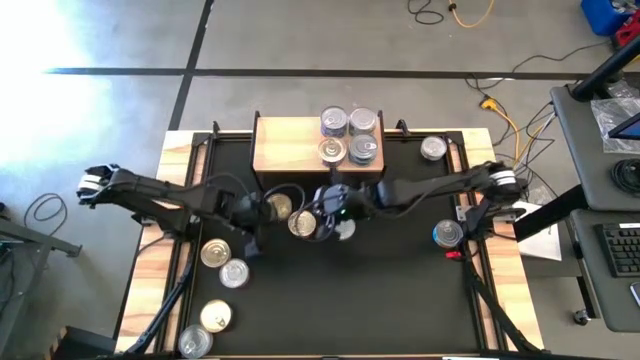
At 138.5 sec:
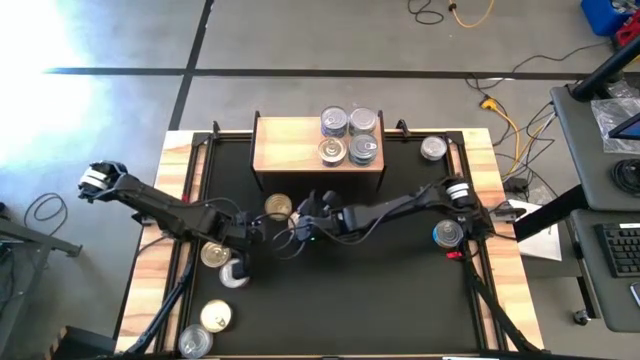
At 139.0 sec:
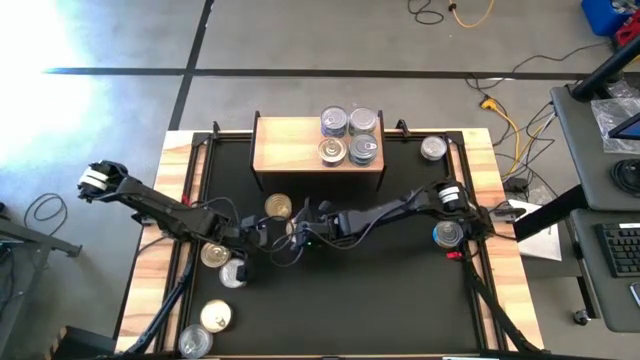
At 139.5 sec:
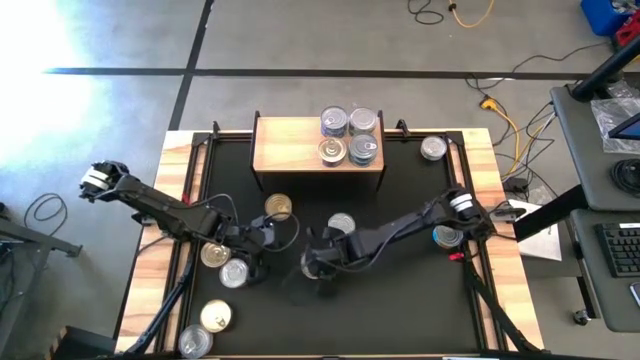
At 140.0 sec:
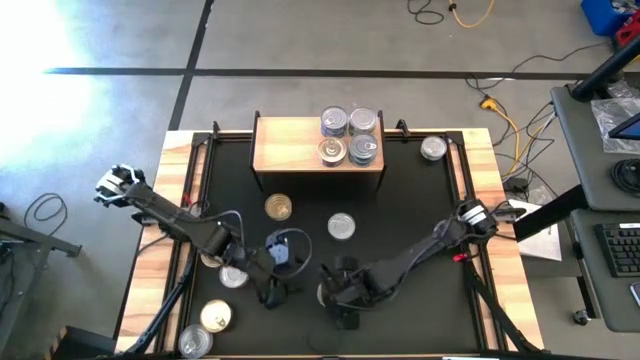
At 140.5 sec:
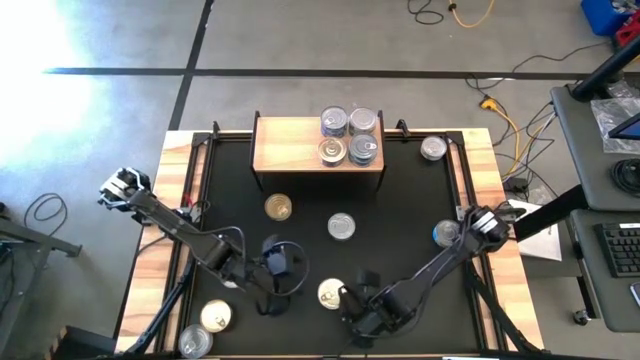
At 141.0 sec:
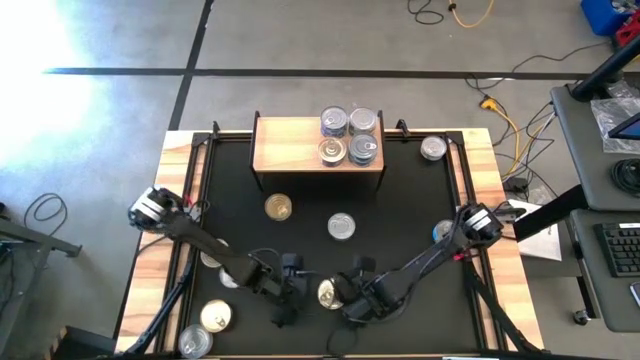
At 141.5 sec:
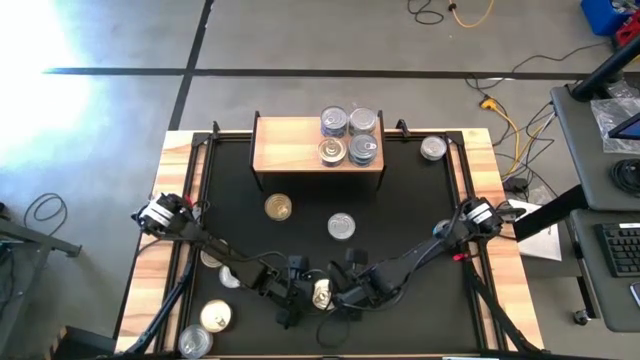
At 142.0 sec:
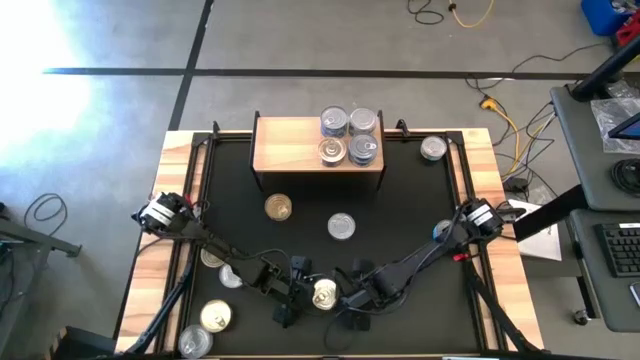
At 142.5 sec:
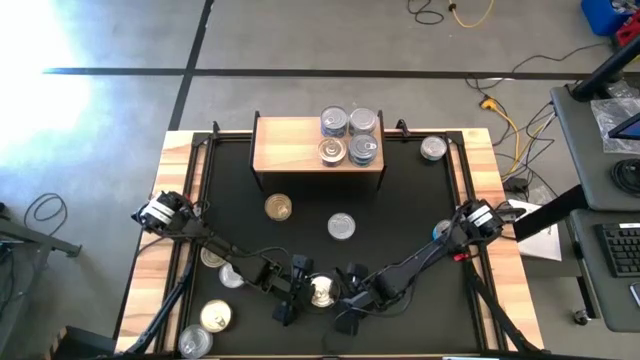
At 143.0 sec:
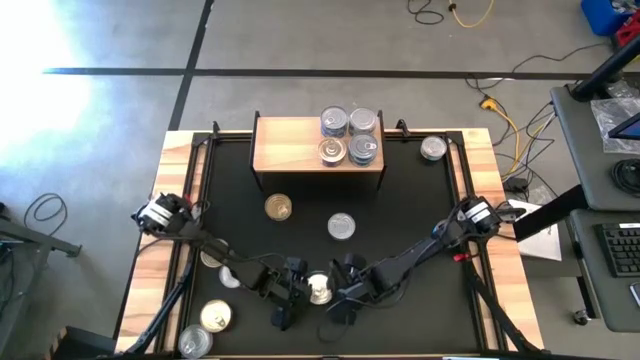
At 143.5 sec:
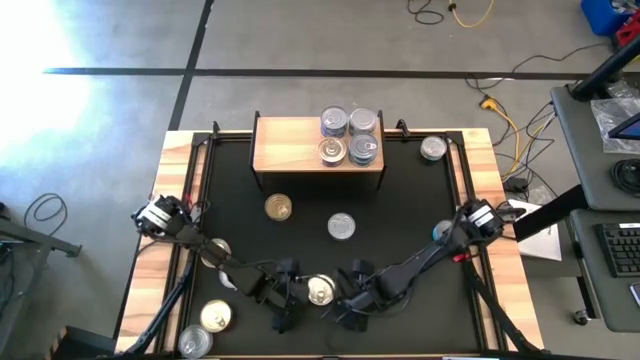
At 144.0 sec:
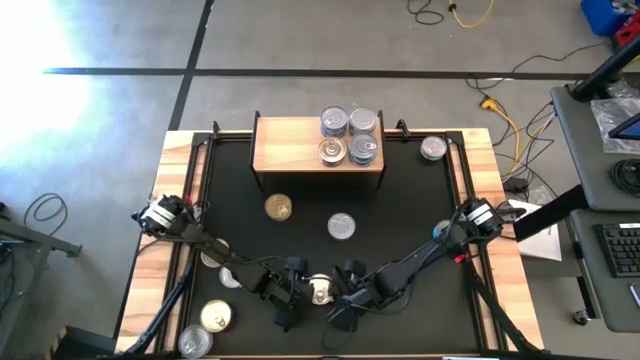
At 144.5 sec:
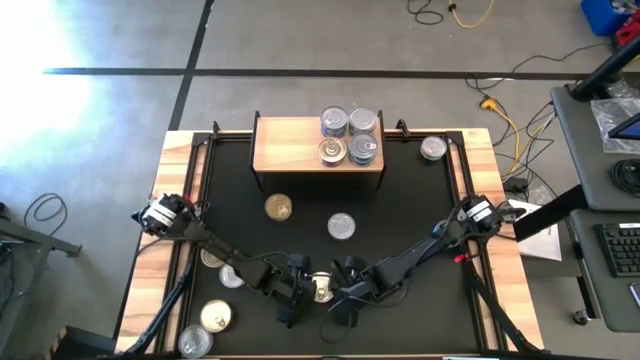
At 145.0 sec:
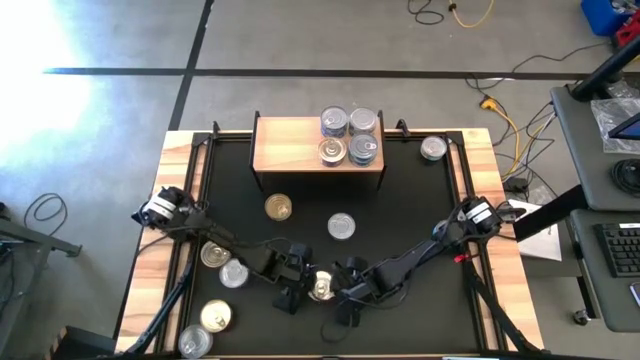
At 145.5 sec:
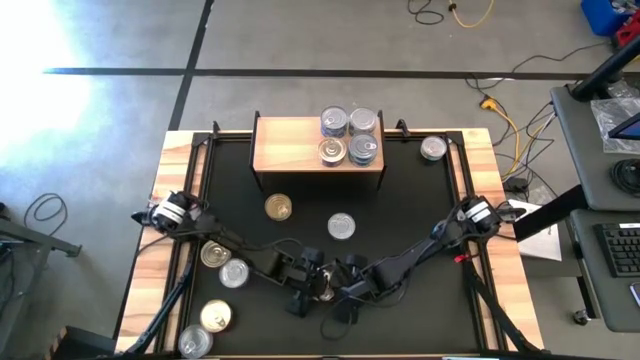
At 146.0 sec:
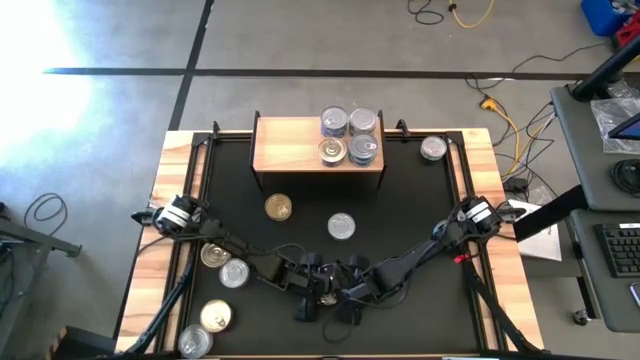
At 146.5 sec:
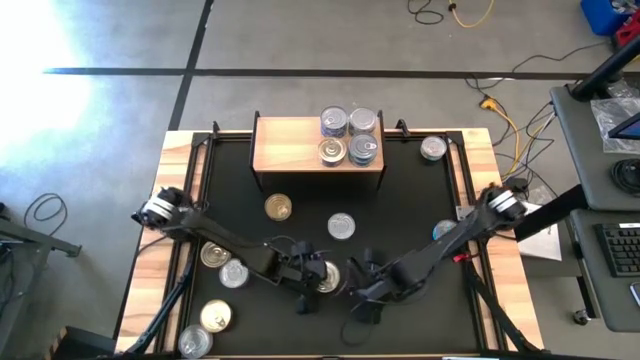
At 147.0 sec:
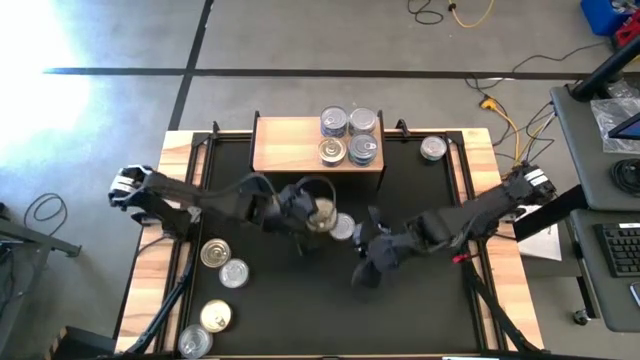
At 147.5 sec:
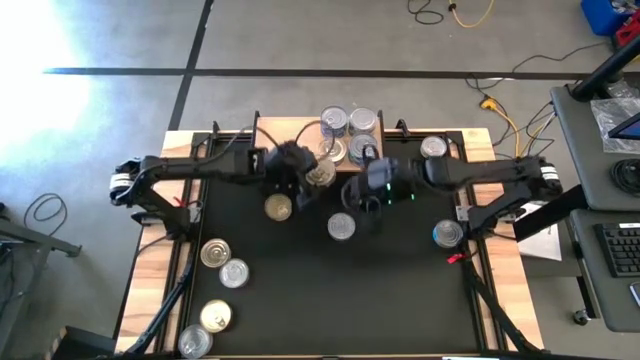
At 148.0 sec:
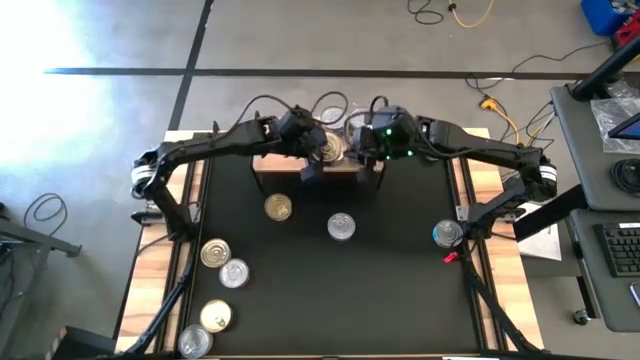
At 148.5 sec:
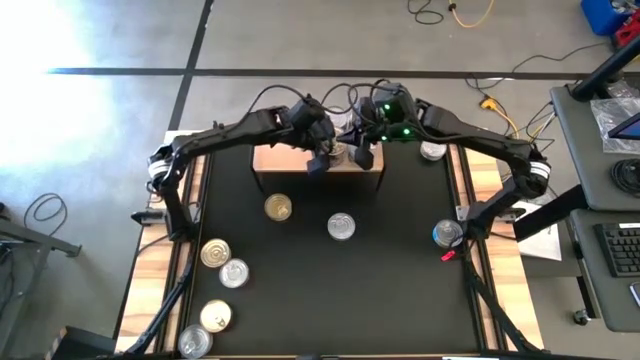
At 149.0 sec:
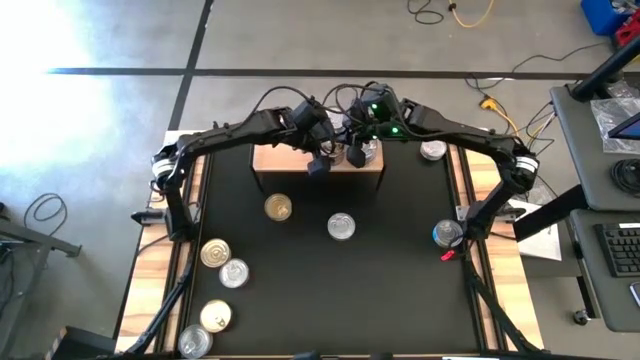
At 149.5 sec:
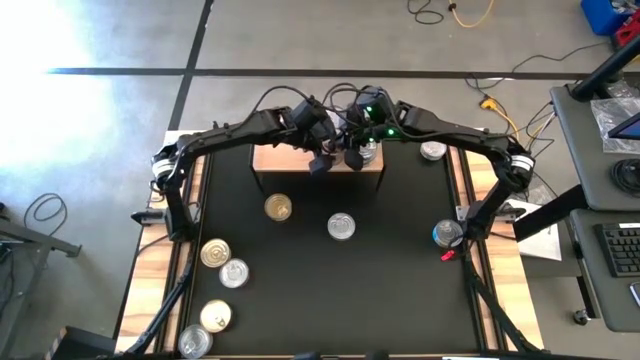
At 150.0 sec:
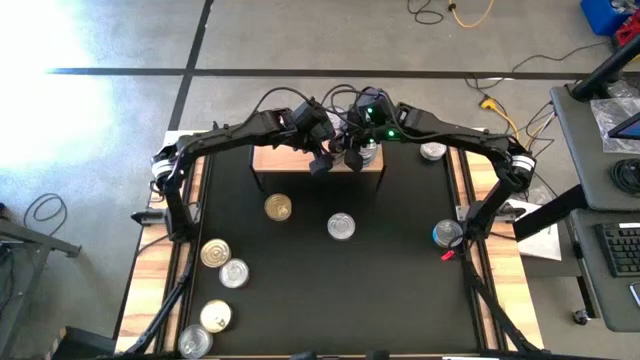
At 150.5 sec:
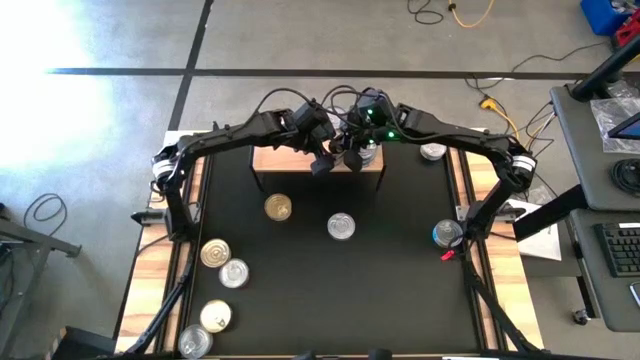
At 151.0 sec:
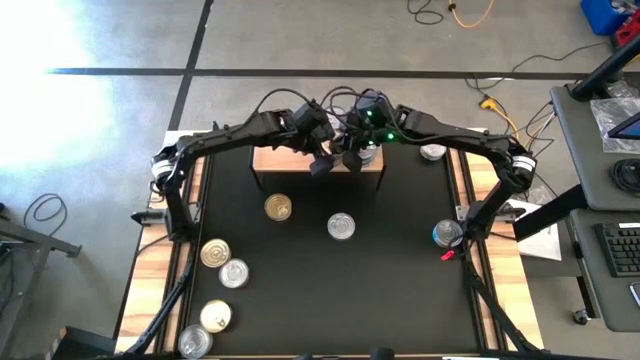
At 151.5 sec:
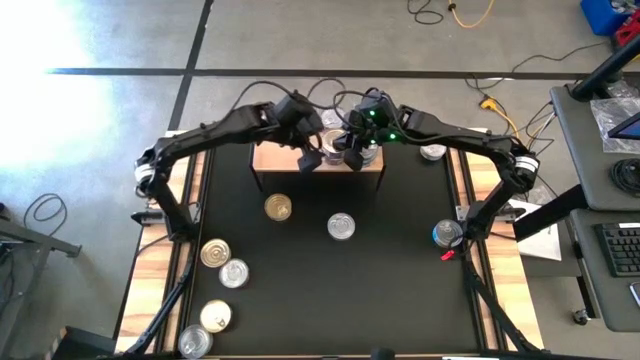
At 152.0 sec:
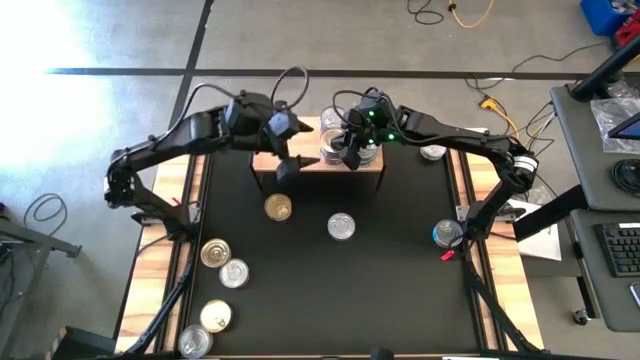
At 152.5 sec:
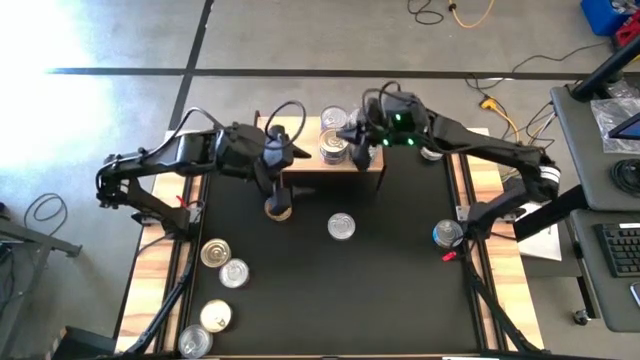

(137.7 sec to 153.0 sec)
Task: Stack canned seafood by type on shelf
Stack the top pink center tuna can on top of the pink tuna can on the shelf

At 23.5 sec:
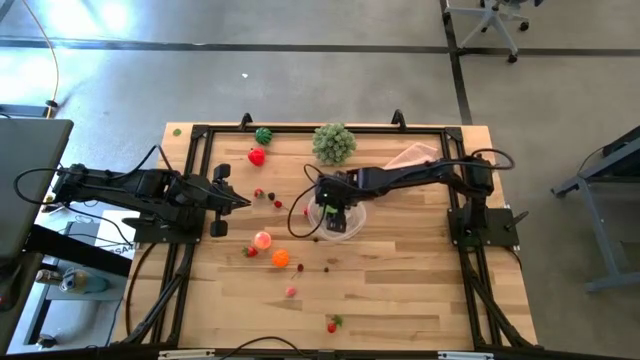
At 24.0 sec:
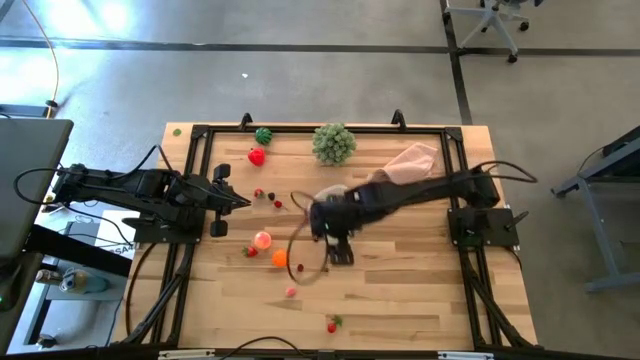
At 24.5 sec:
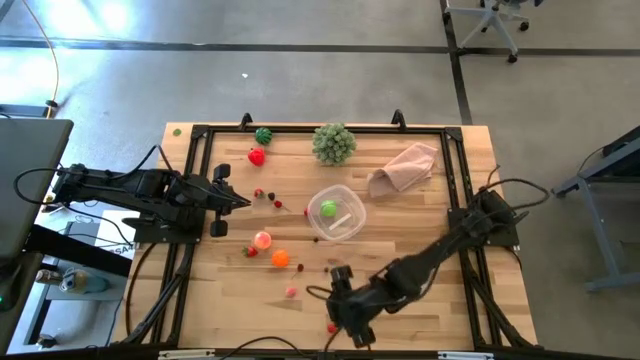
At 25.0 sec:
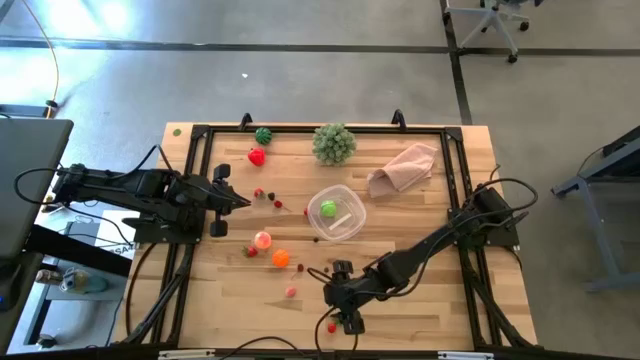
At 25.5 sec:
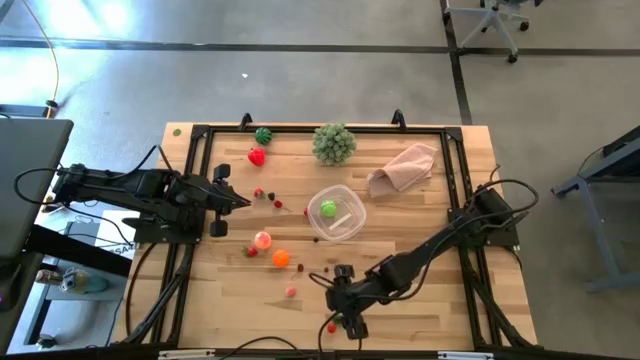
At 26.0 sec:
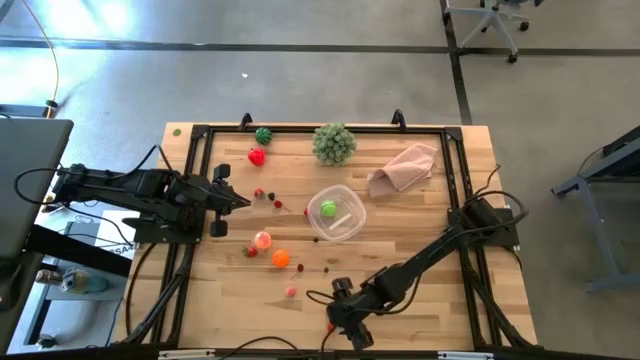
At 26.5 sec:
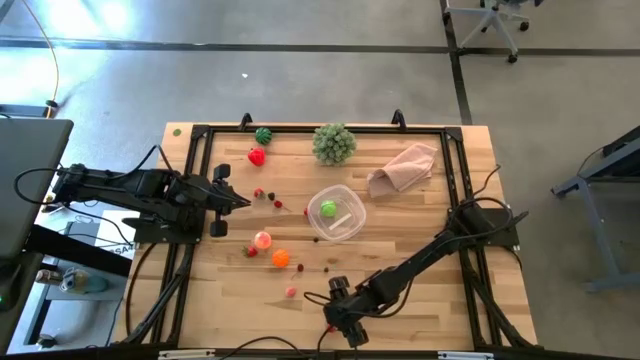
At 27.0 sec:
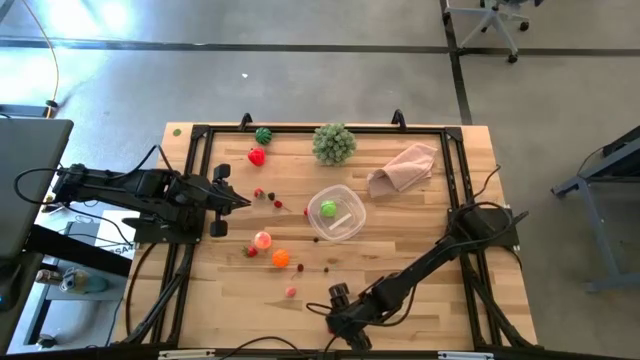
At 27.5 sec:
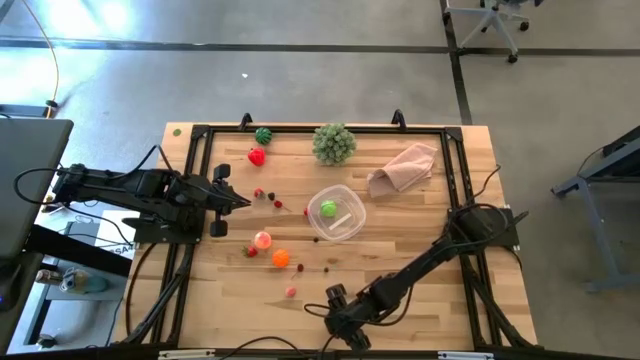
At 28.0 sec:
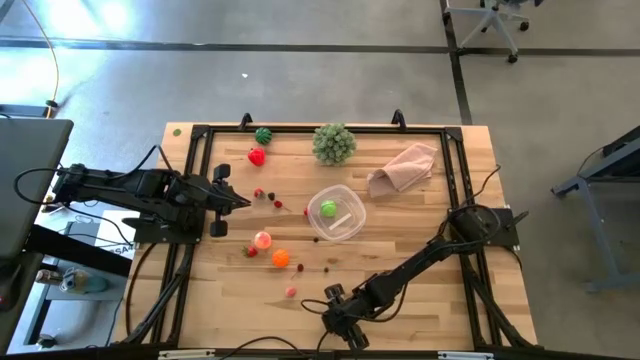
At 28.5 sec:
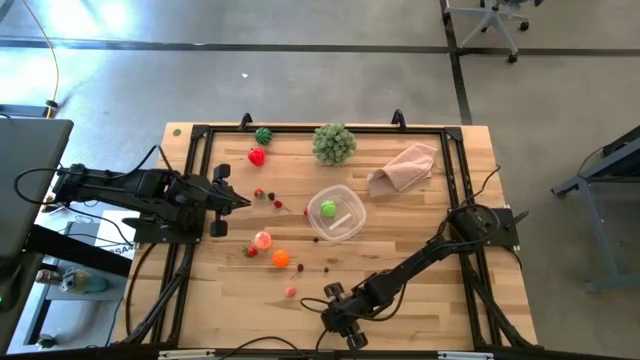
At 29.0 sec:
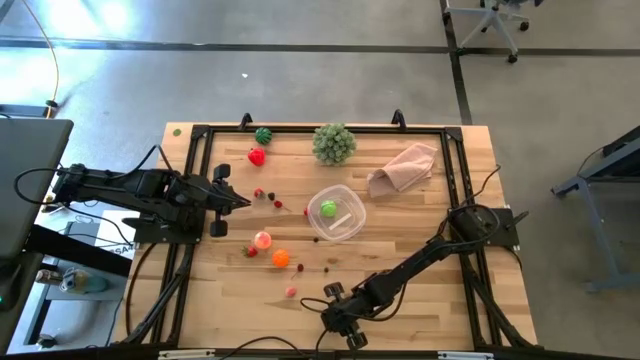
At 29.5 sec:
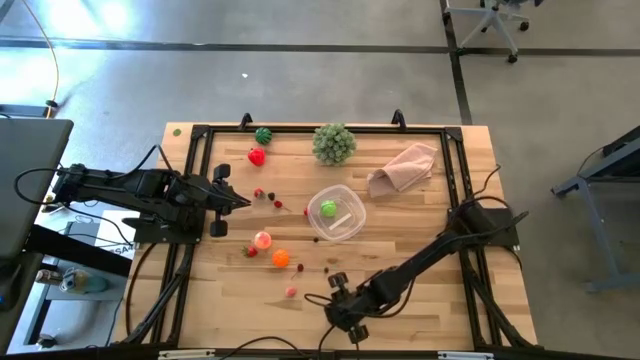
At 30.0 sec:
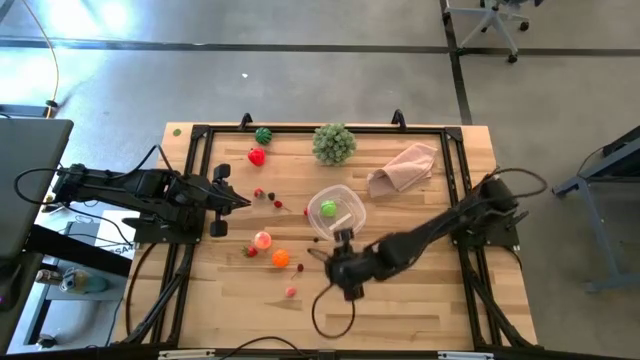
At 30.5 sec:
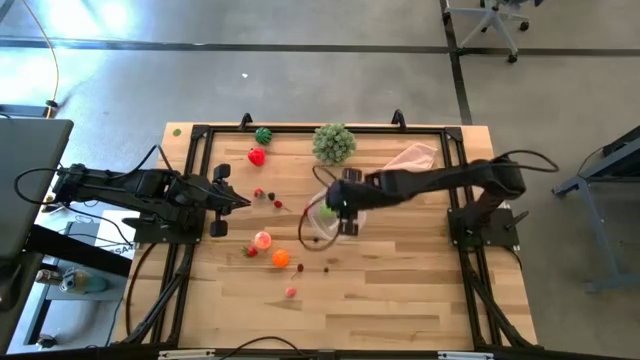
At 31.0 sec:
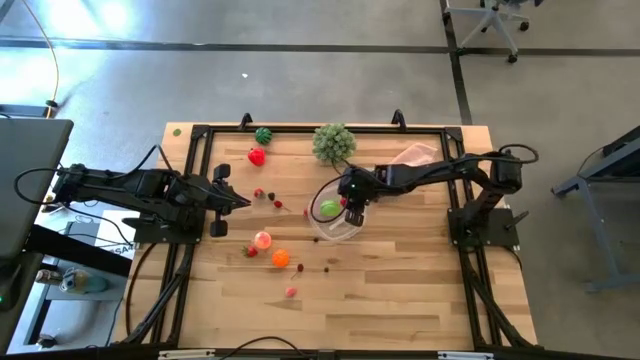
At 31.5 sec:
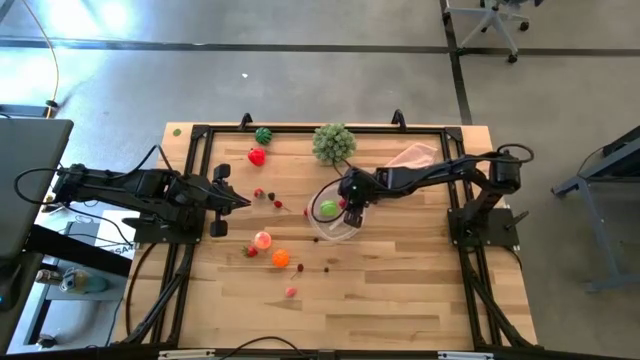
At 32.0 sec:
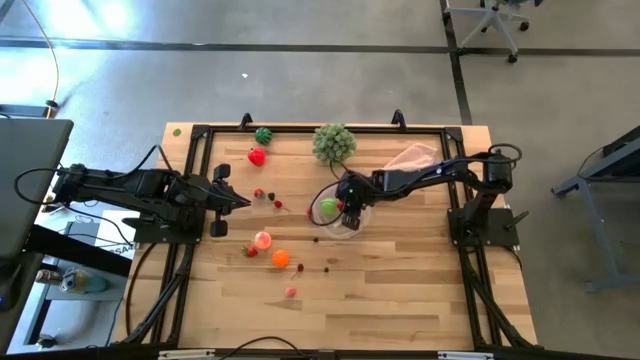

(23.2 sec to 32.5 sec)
Task: Pick and placing Produce into tupperware
Put the cherry tomato into the container
